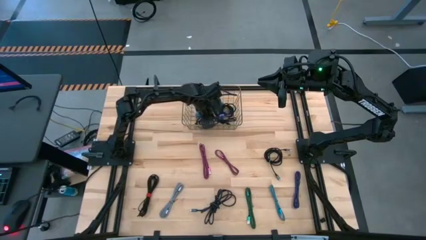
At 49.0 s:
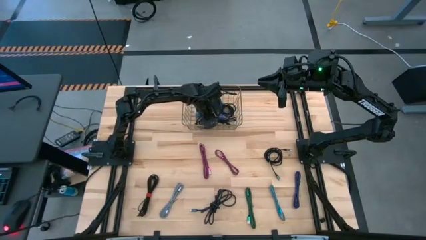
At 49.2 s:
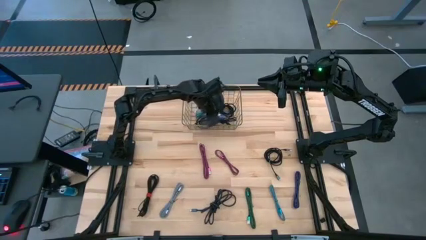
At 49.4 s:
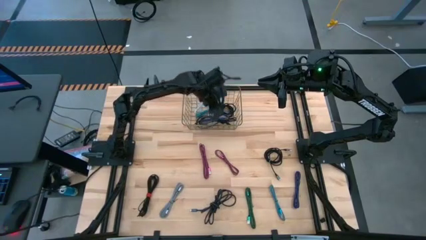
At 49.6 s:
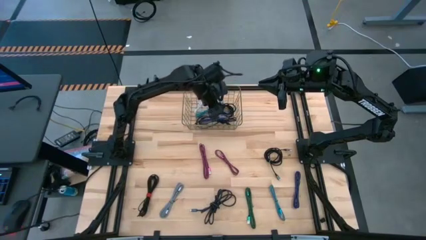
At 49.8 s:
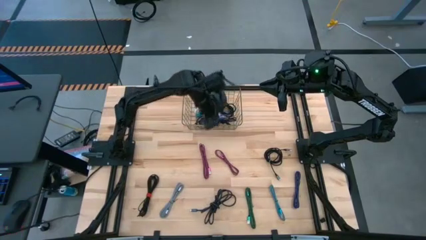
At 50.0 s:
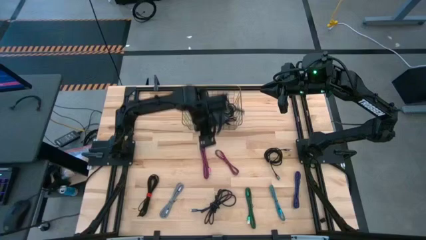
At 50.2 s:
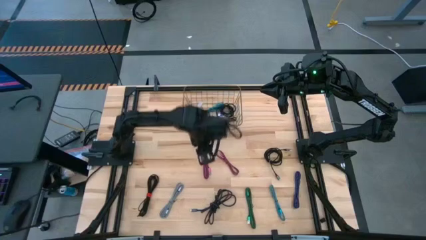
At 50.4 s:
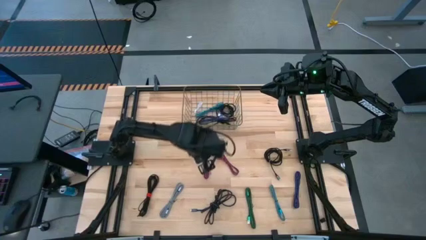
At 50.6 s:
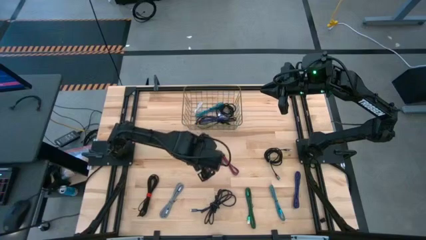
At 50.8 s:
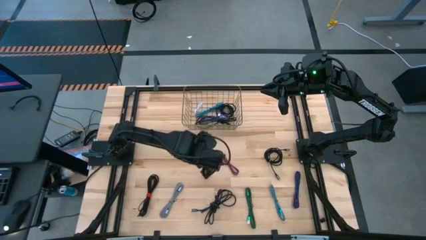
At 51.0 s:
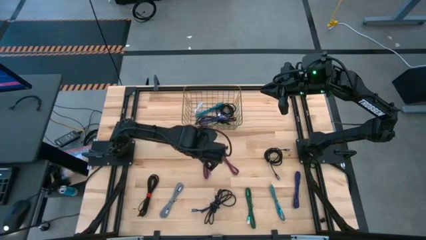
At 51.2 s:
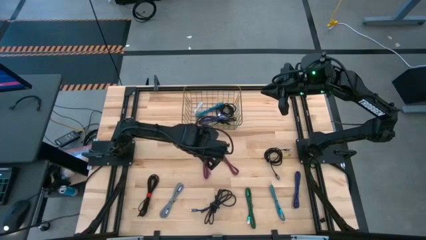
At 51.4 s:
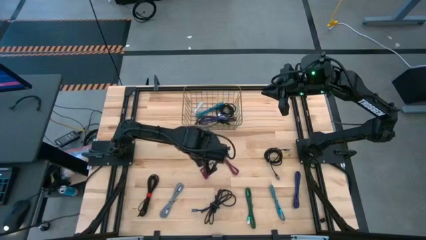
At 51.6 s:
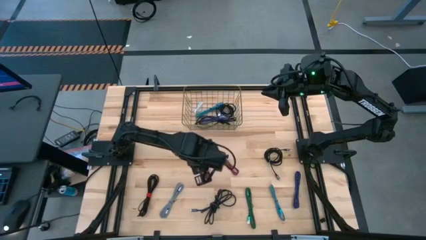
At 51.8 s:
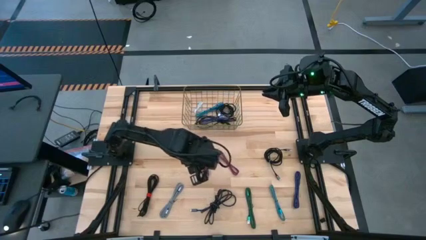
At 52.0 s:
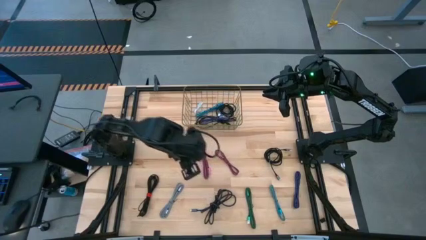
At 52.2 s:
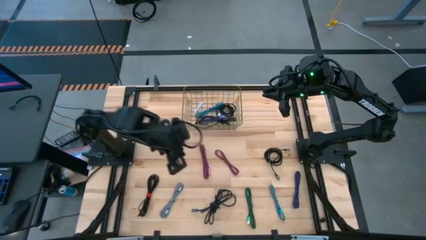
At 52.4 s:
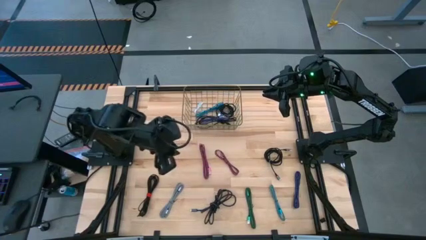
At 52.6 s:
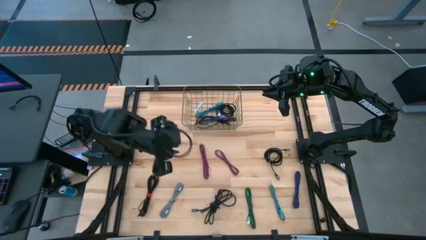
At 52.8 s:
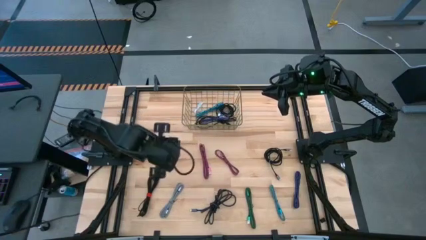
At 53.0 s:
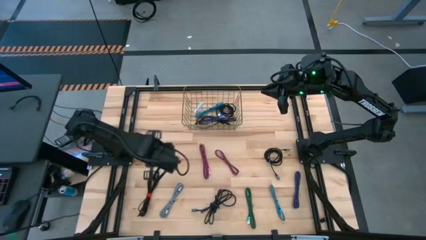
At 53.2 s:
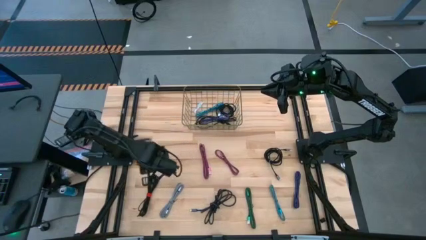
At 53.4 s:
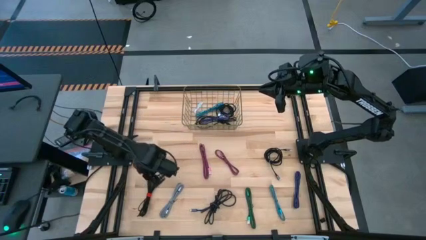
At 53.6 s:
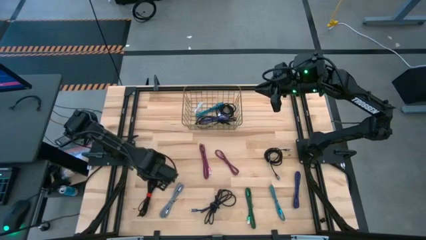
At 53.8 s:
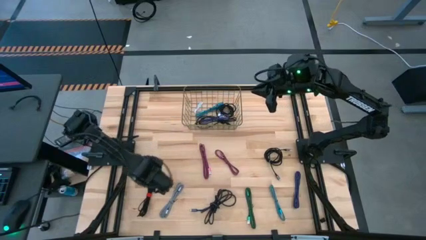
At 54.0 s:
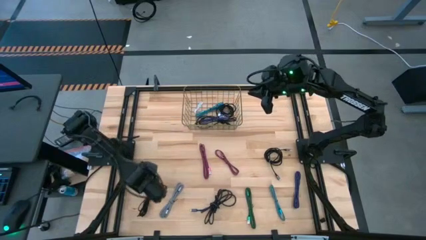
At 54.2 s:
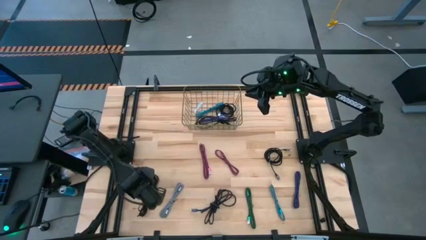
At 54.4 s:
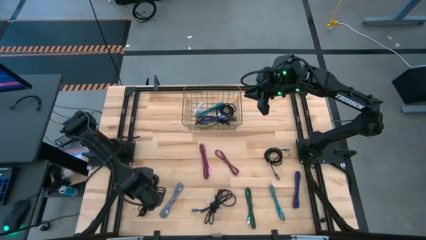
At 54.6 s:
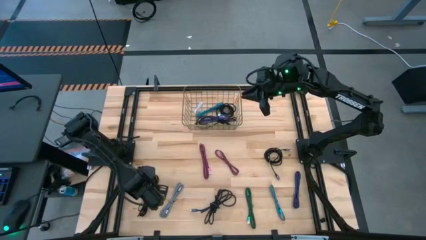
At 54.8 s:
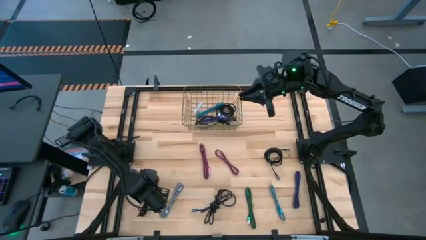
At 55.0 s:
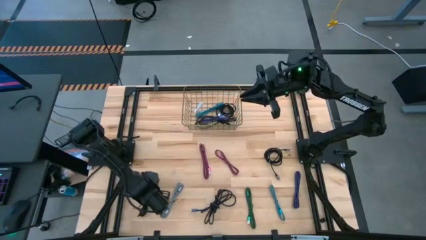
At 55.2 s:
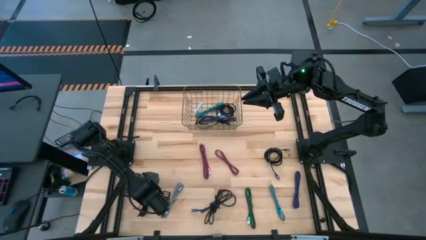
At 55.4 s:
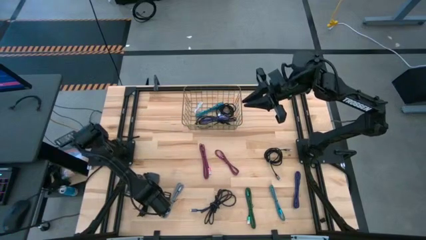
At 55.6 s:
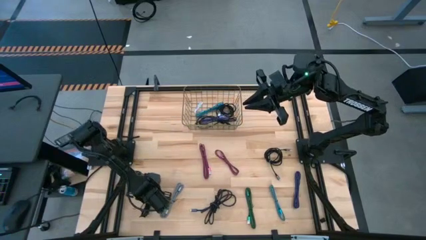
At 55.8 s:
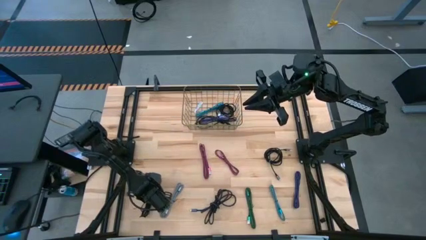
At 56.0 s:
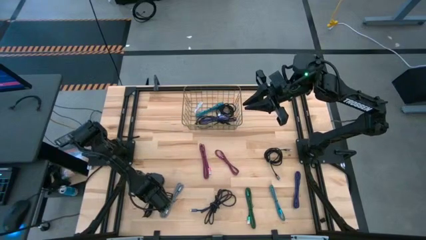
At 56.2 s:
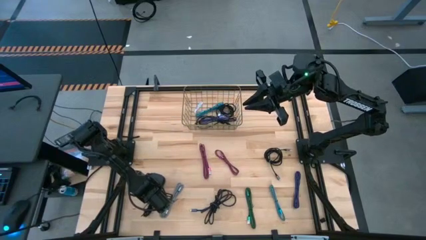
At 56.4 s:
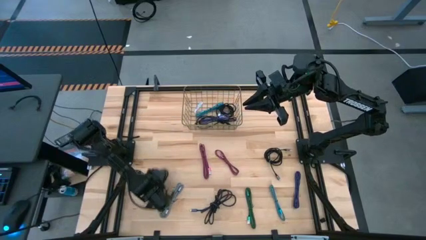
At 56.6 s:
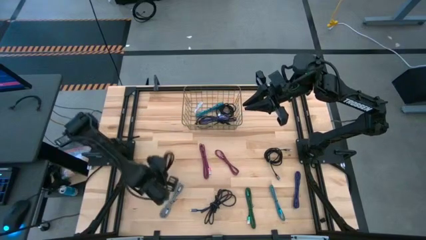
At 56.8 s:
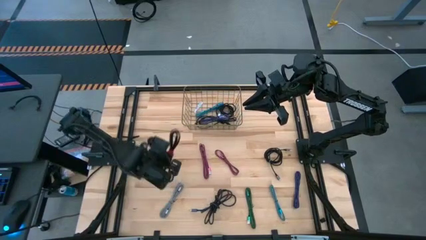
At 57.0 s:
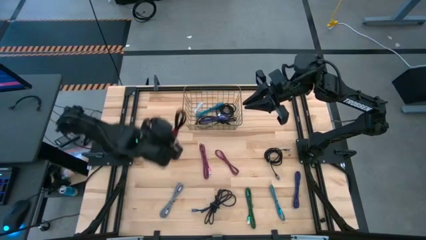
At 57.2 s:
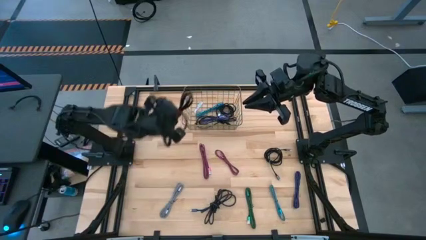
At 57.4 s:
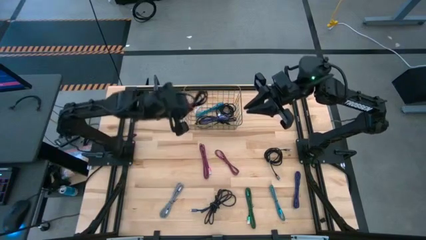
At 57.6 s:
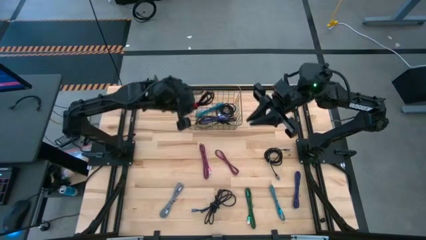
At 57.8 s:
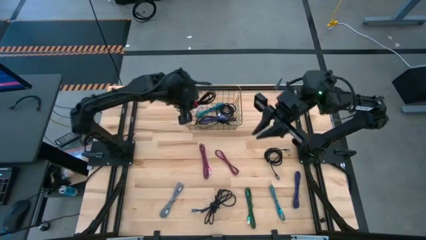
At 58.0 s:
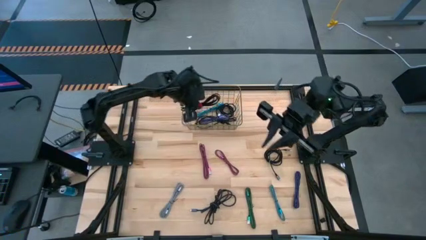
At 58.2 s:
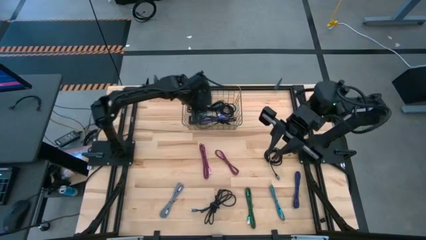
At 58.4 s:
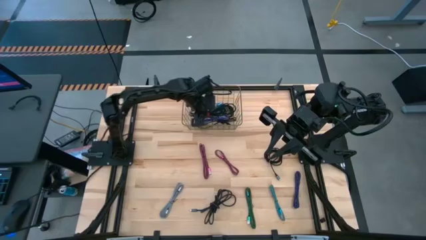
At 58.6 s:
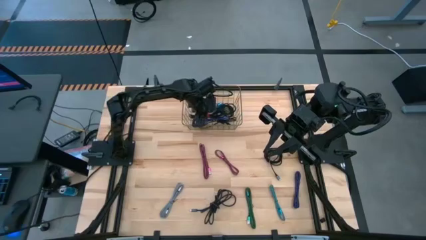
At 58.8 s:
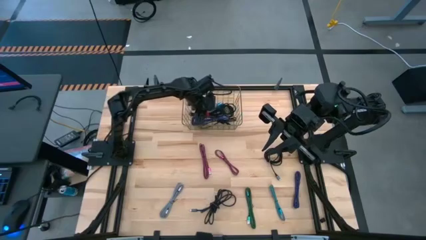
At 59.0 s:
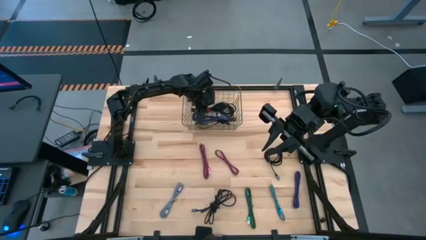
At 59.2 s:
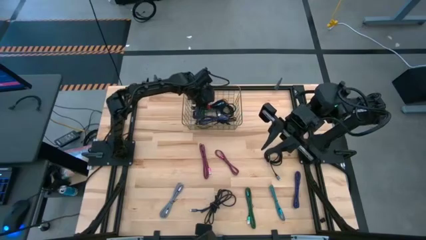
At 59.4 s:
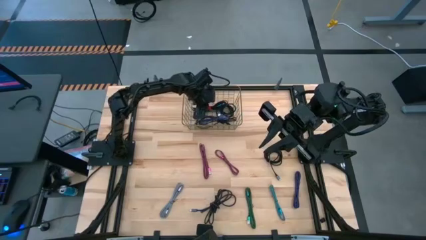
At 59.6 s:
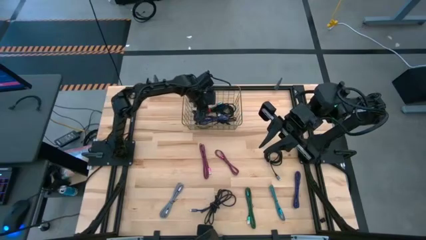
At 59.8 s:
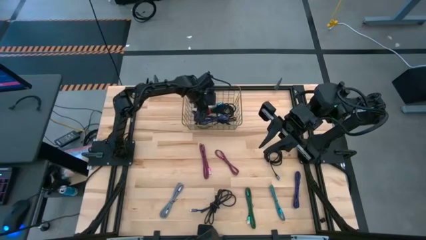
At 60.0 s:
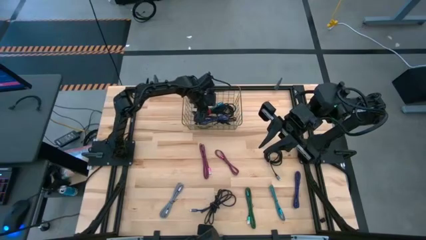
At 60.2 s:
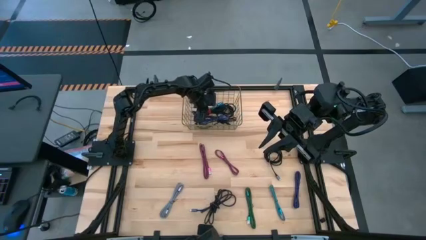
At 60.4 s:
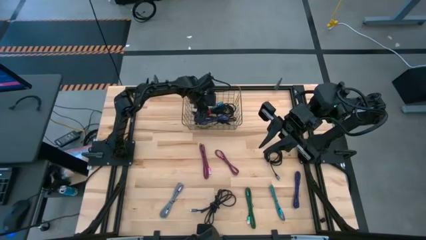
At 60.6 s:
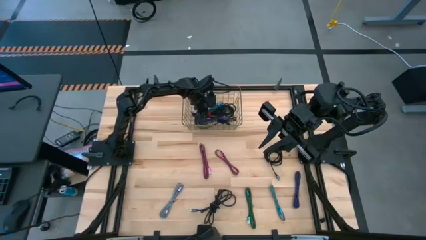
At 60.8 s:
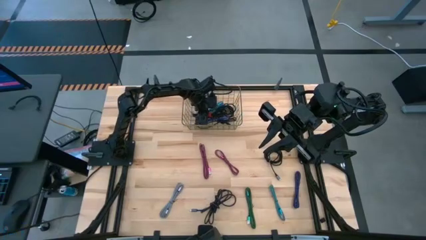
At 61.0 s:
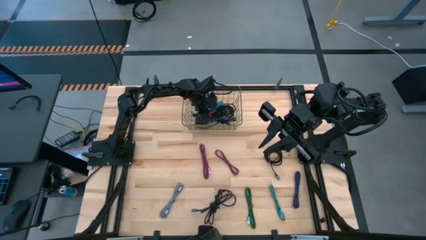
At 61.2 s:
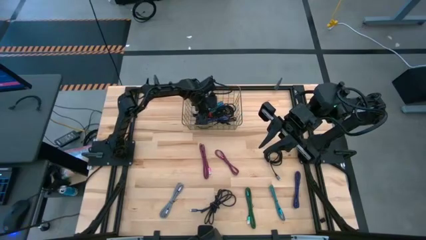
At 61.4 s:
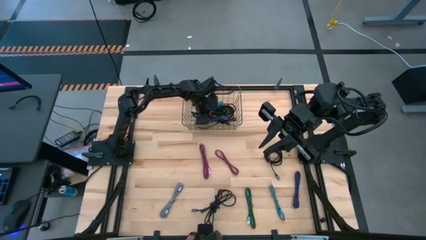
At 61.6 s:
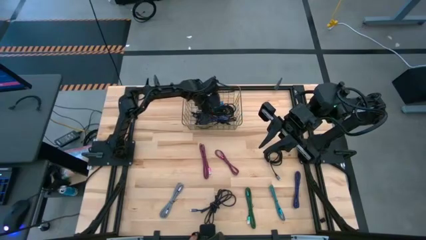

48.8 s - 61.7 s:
Task: Pick and place USB-C Cables
Put the black charger cable into the wire basket

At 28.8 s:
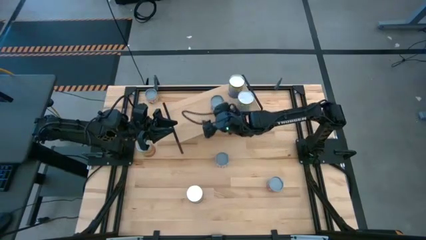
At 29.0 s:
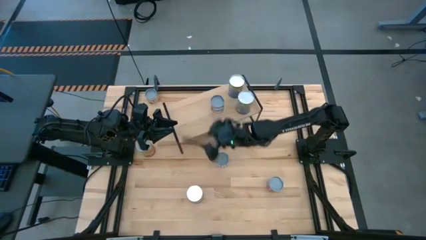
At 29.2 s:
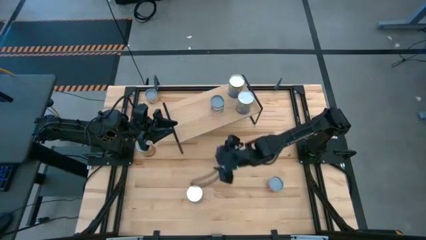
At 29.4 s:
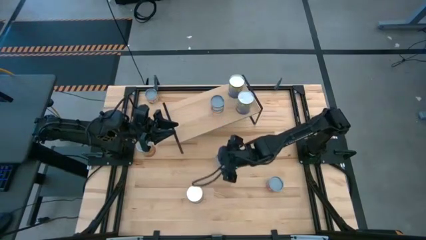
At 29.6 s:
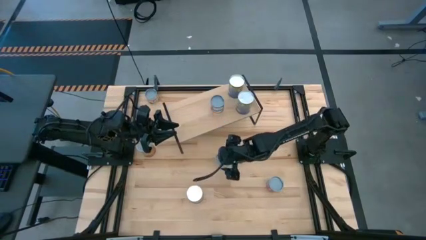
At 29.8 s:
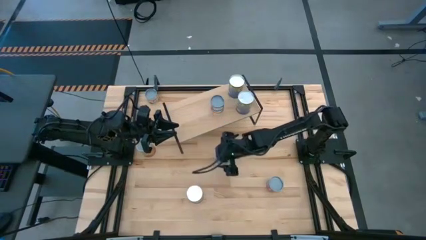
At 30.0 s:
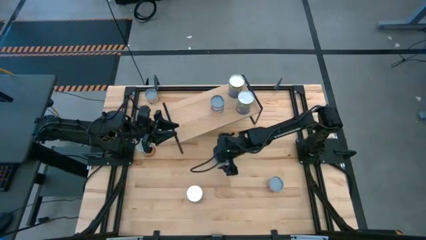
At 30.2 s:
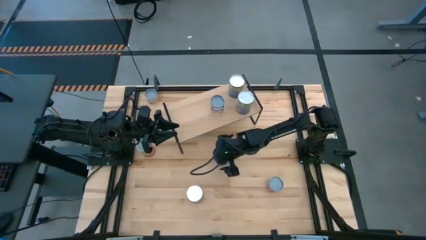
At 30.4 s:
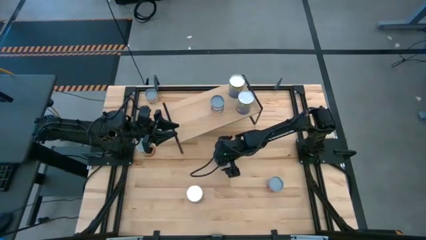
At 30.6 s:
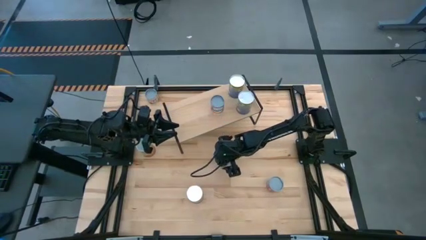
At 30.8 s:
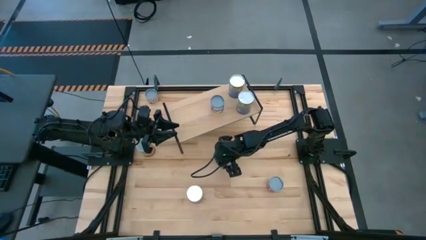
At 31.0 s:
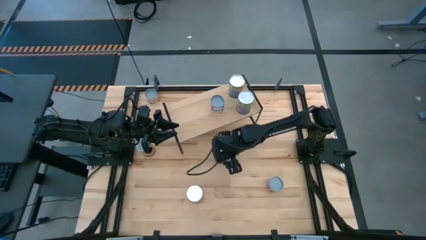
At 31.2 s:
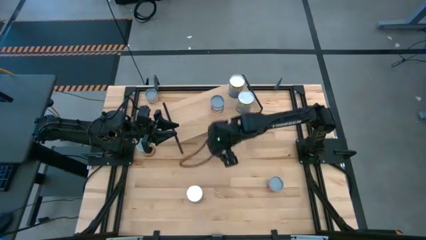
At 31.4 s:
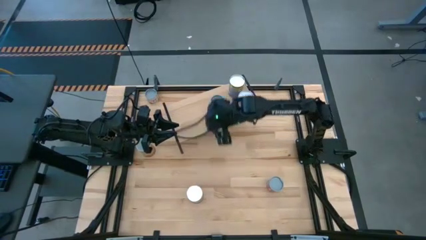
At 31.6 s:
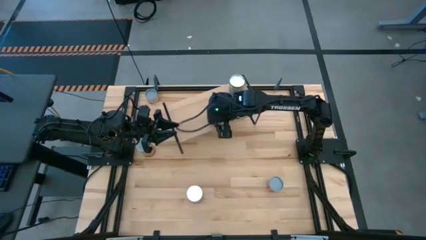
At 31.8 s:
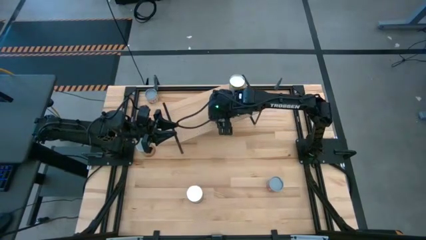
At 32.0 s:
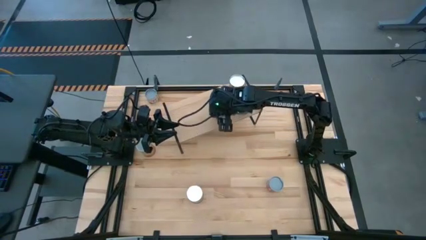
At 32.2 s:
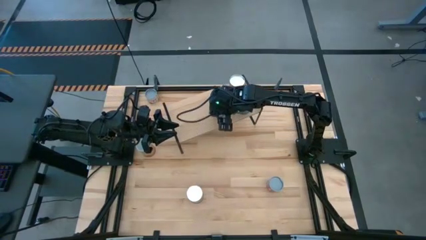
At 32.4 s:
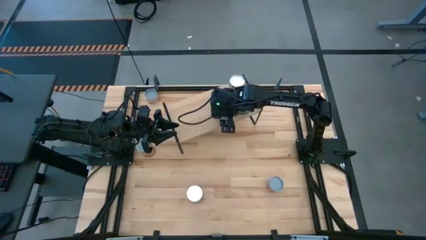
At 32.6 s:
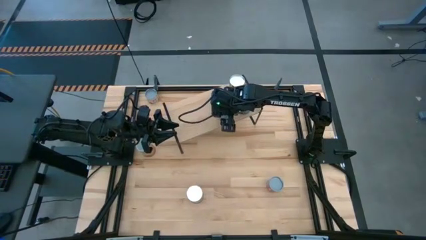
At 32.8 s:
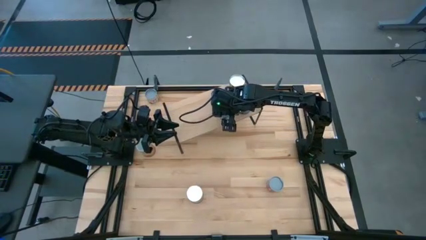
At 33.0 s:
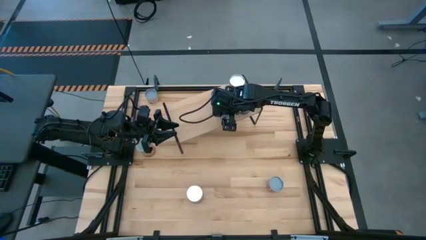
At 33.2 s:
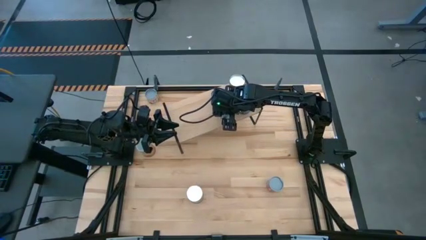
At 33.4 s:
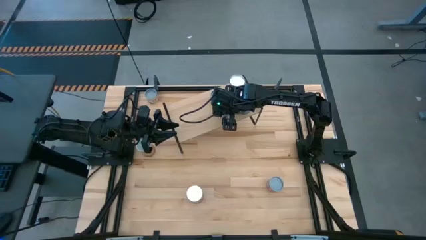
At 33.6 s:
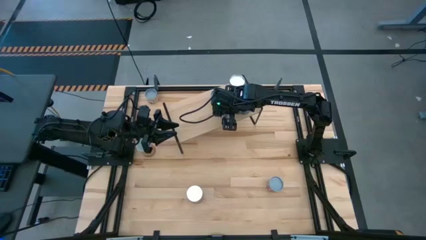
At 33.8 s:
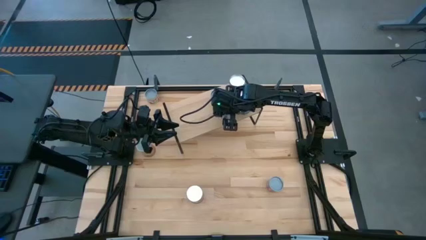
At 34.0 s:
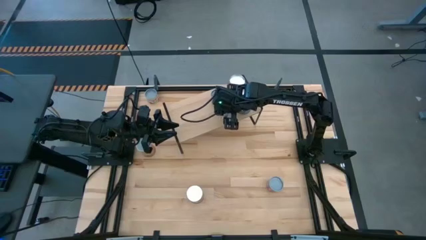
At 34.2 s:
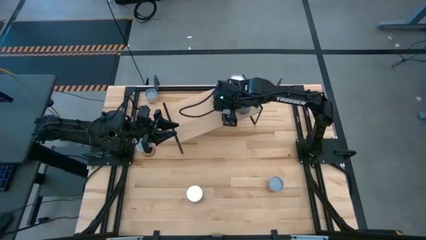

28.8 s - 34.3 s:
Task: Pick and place cans onto a shelf
Put the canned carrots on the shelf
